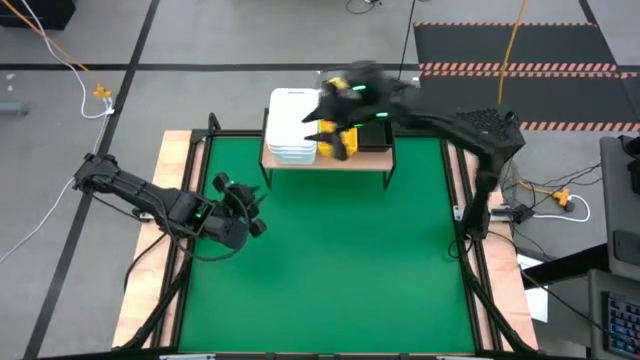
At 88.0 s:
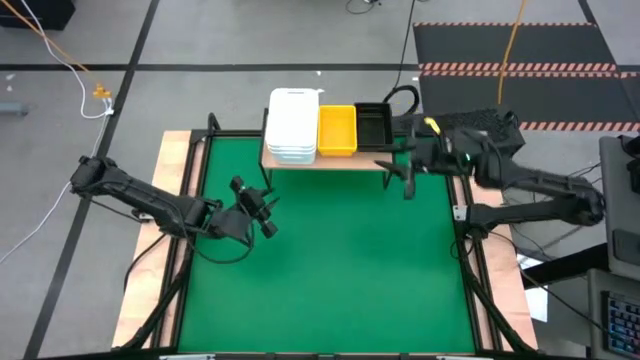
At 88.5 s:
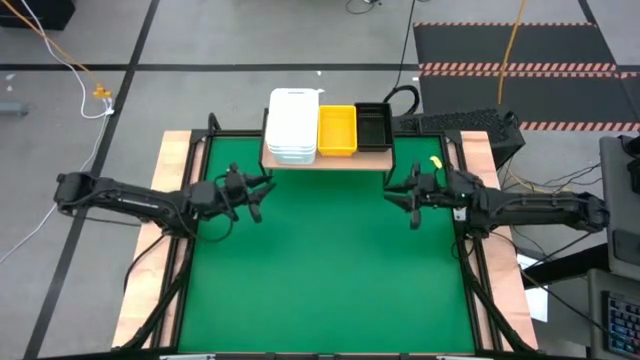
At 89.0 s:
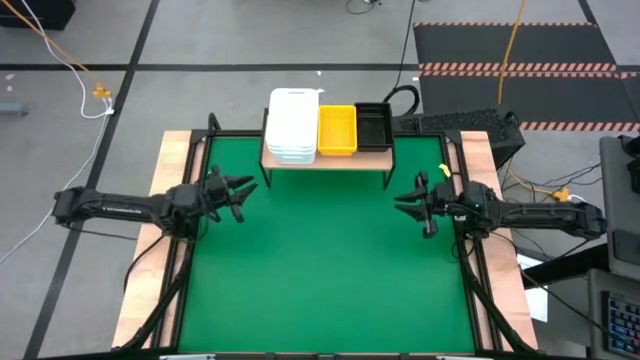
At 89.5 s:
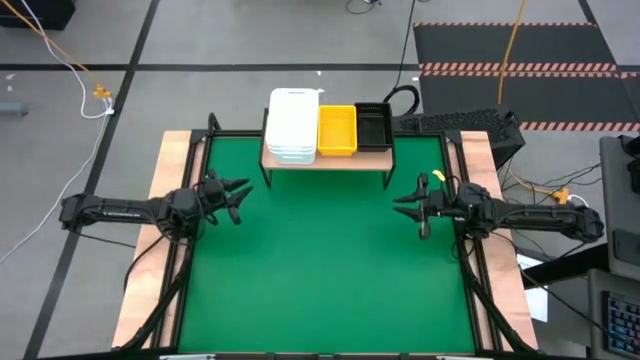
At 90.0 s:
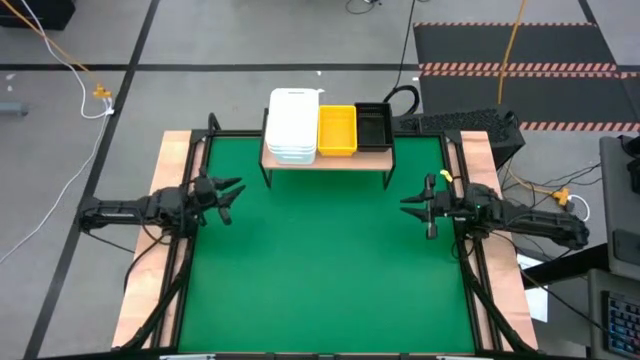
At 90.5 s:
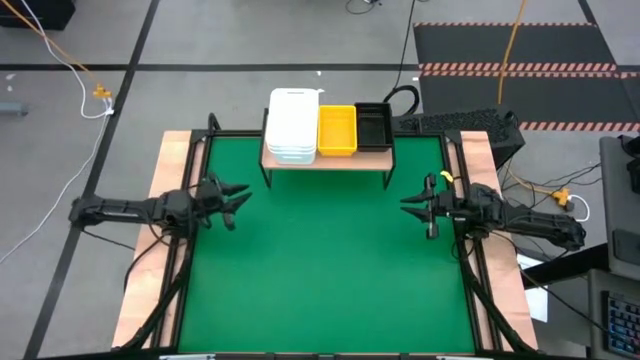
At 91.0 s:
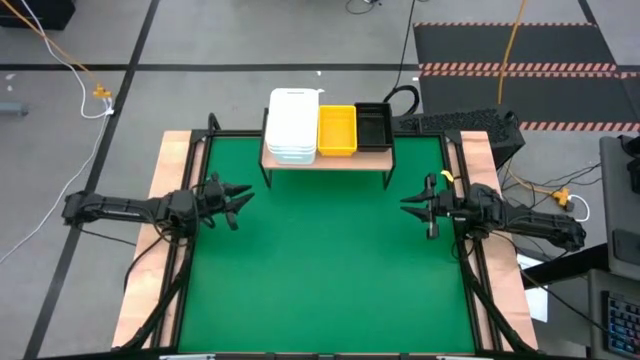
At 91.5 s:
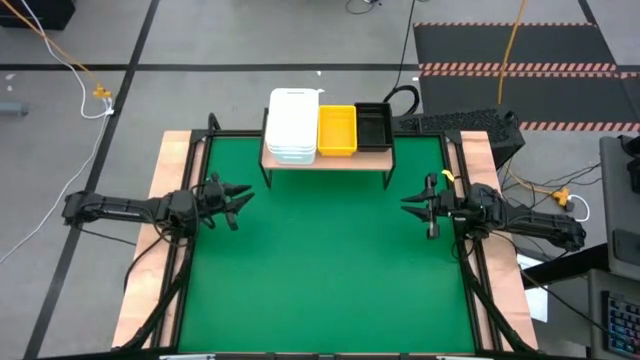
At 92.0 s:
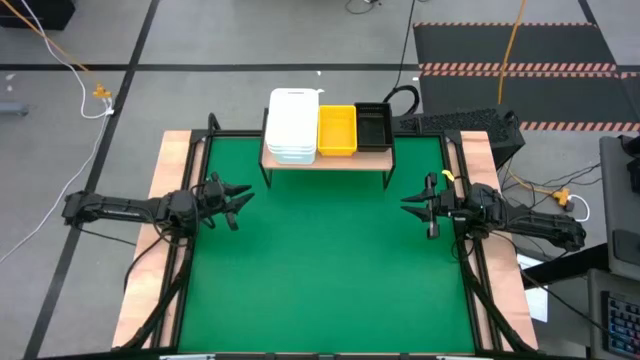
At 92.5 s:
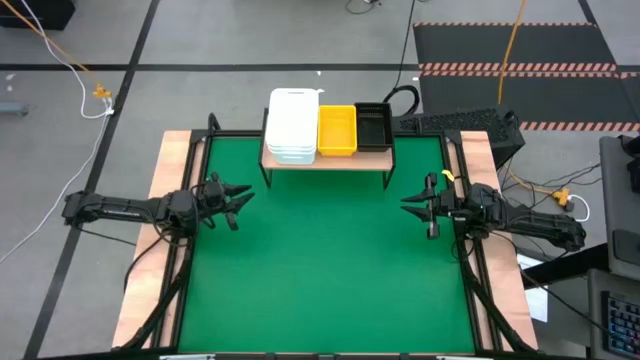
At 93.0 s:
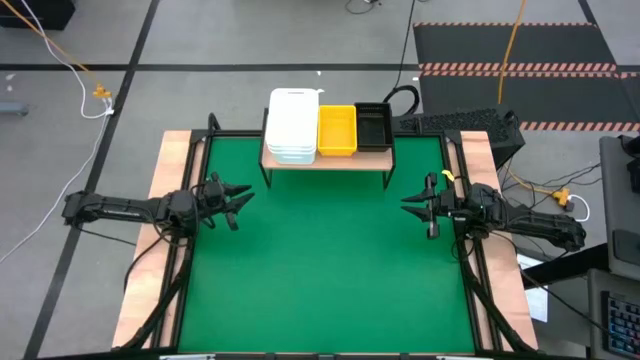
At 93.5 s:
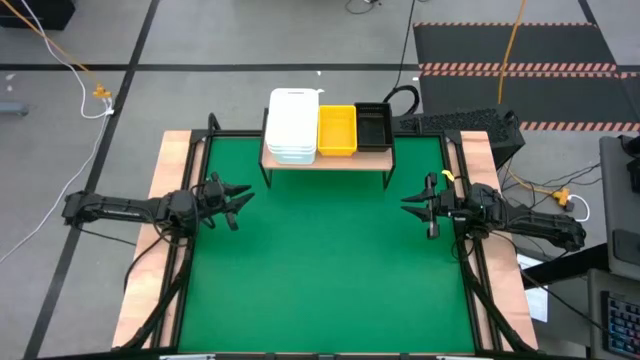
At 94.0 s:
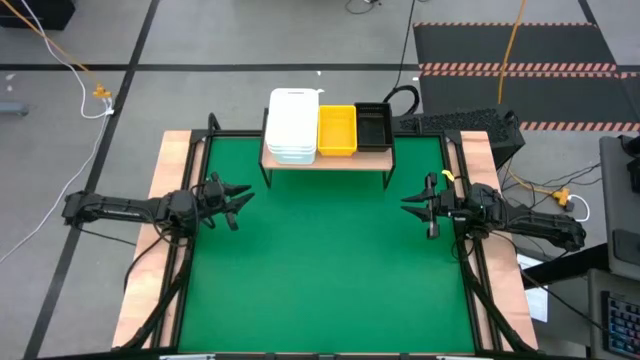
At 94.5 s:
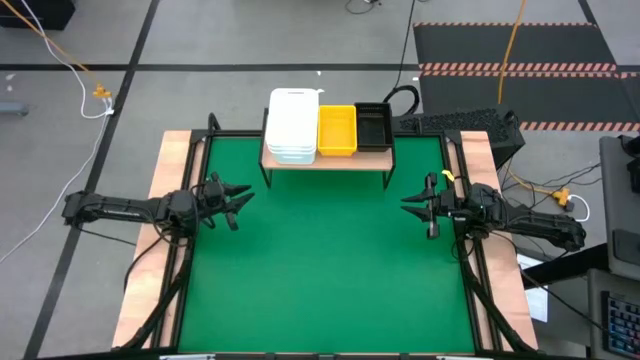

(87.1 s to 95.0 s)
Task: Stack baskets on shelf by color
Return to Home Position

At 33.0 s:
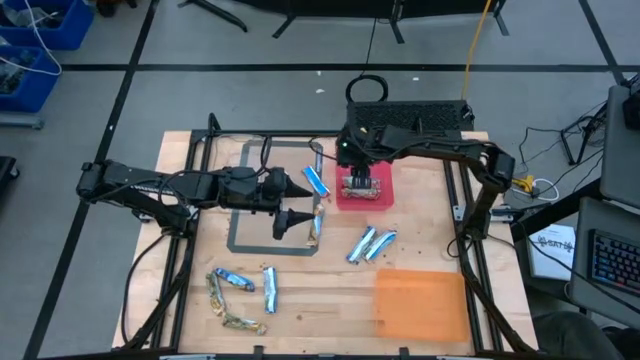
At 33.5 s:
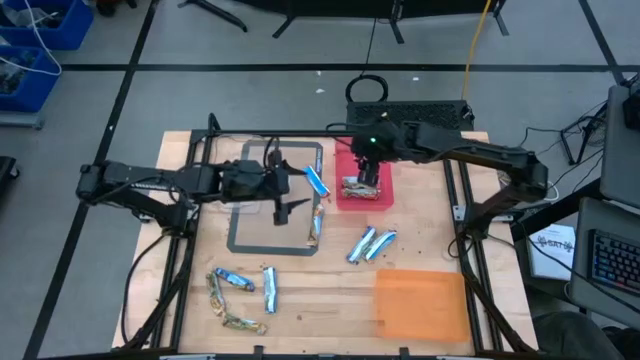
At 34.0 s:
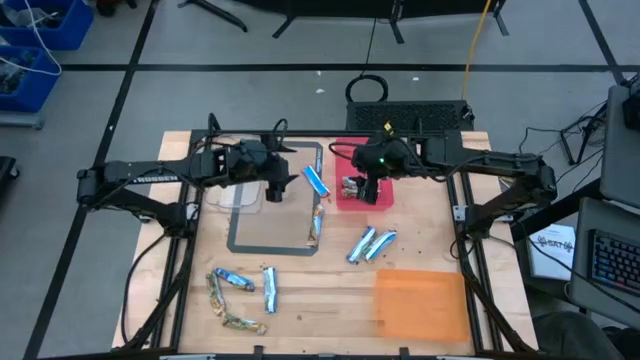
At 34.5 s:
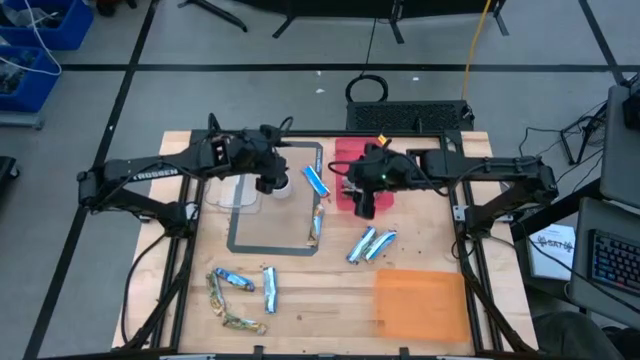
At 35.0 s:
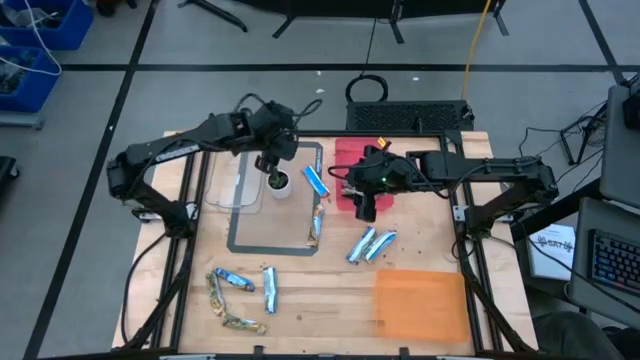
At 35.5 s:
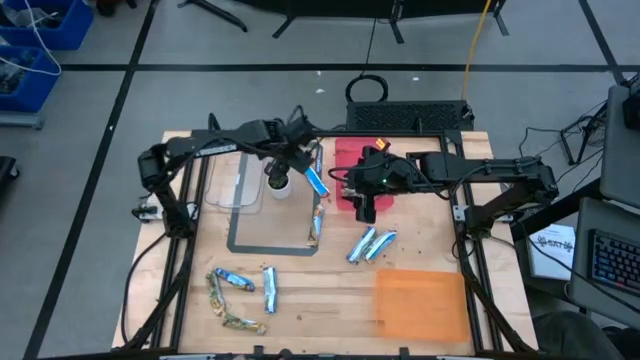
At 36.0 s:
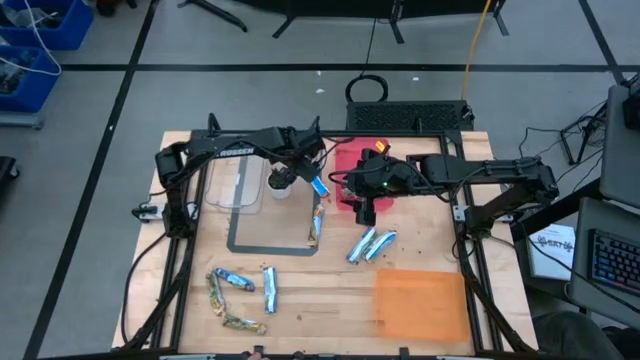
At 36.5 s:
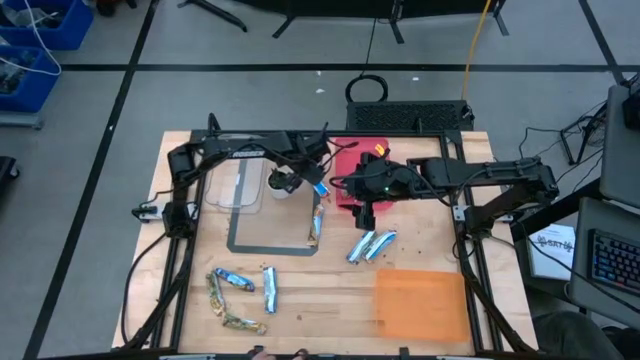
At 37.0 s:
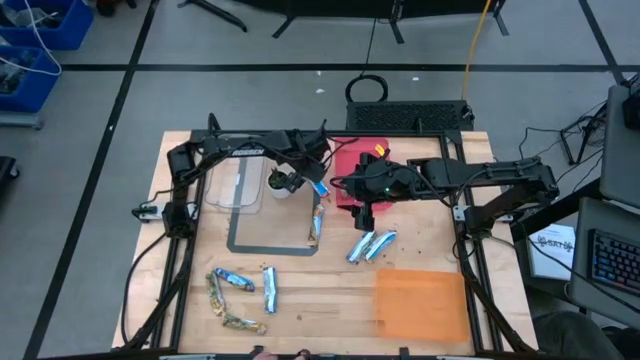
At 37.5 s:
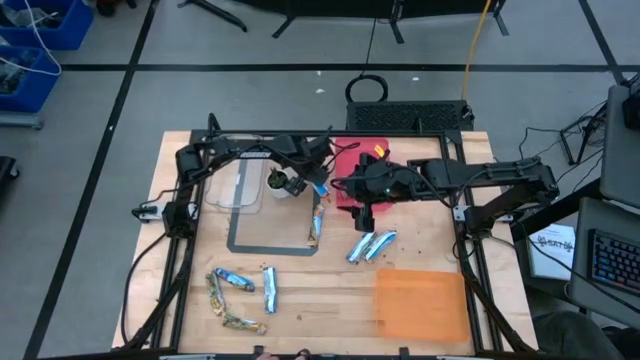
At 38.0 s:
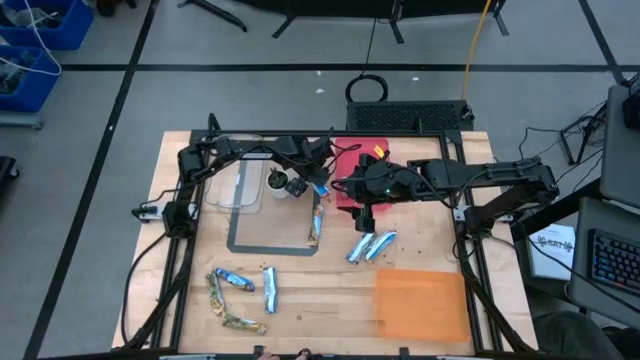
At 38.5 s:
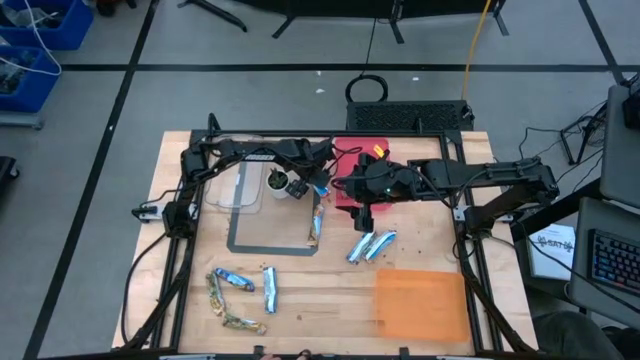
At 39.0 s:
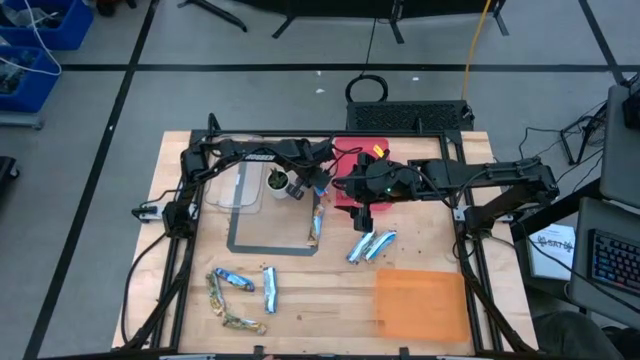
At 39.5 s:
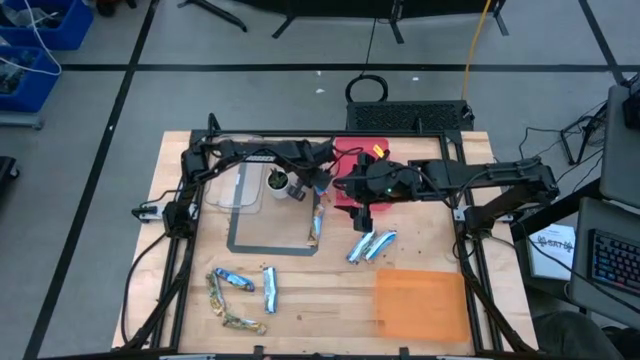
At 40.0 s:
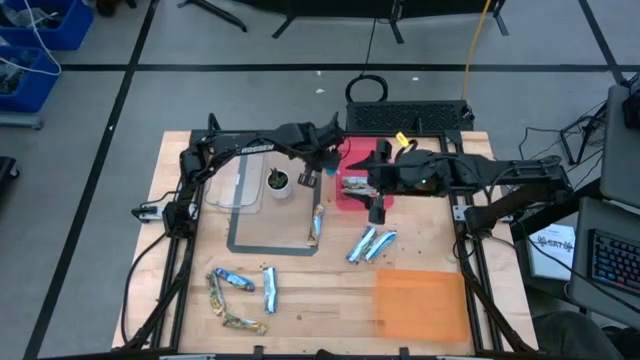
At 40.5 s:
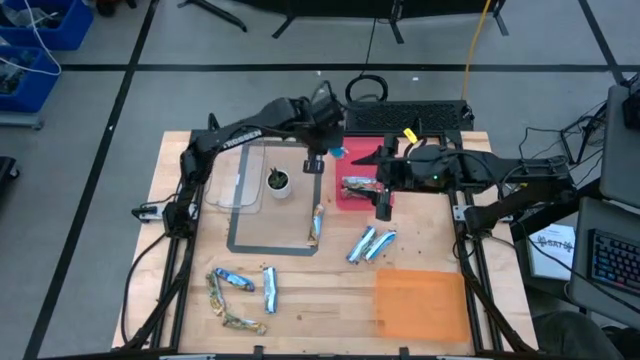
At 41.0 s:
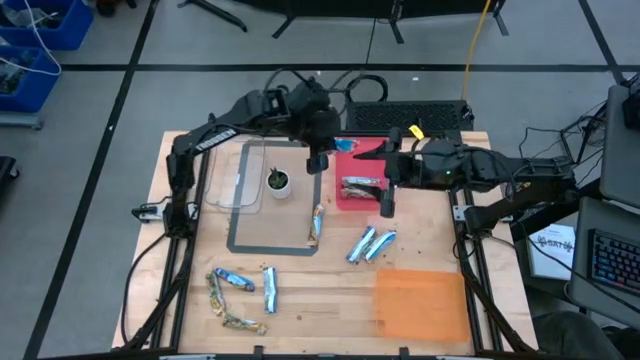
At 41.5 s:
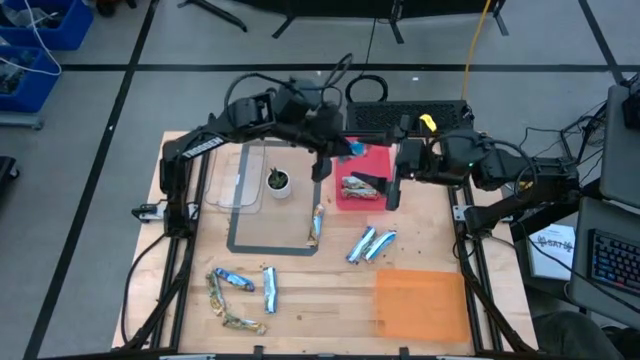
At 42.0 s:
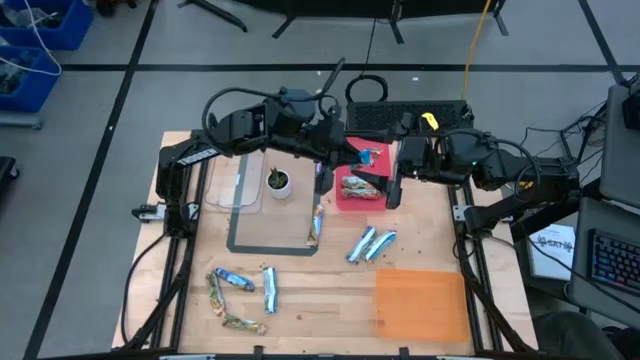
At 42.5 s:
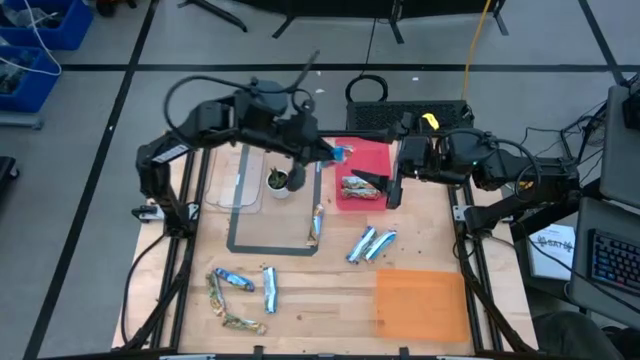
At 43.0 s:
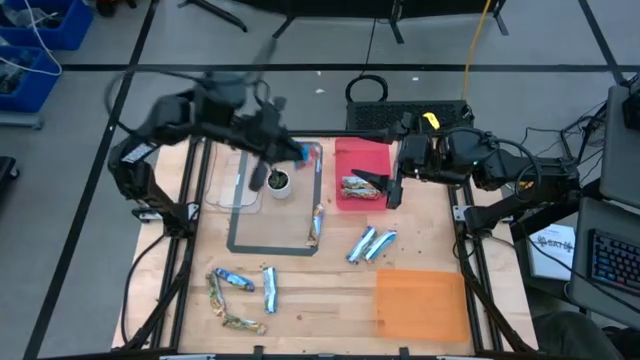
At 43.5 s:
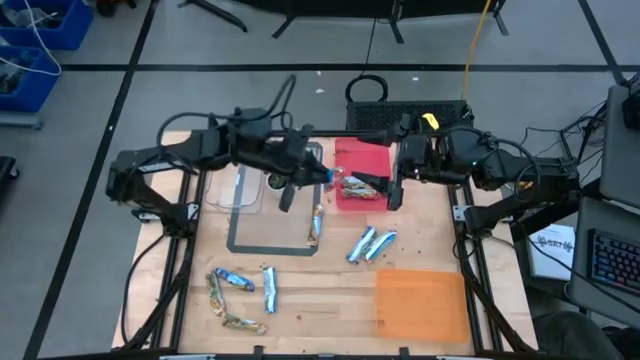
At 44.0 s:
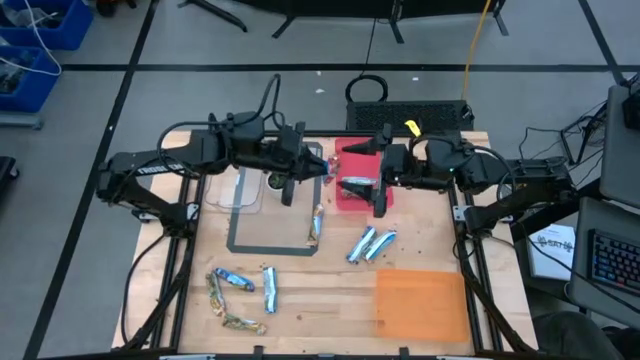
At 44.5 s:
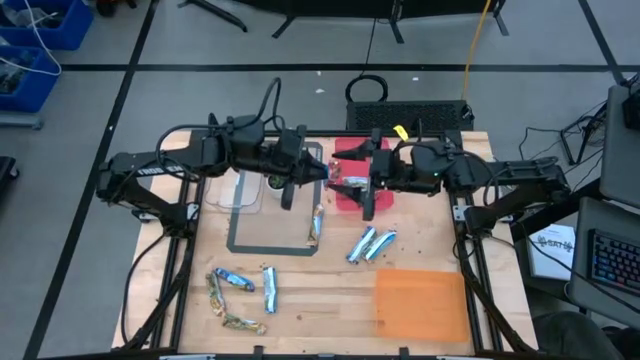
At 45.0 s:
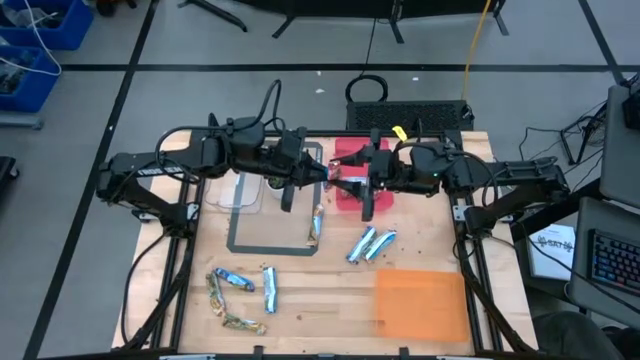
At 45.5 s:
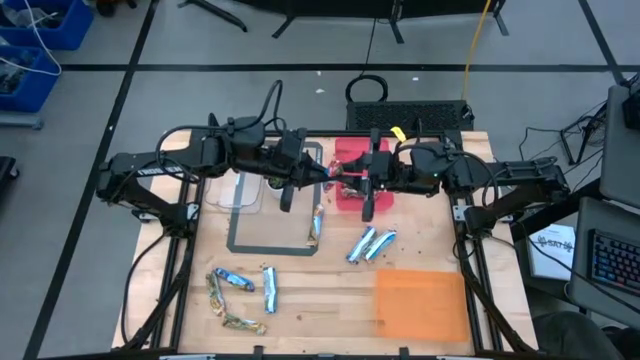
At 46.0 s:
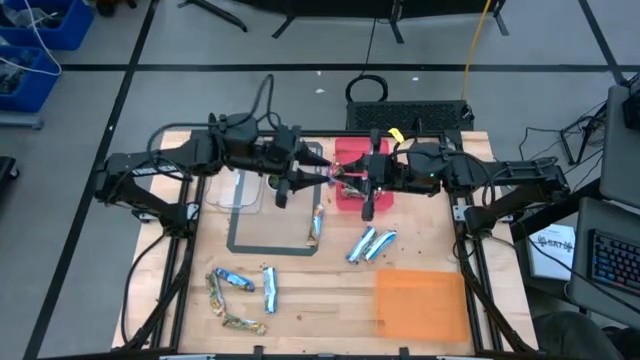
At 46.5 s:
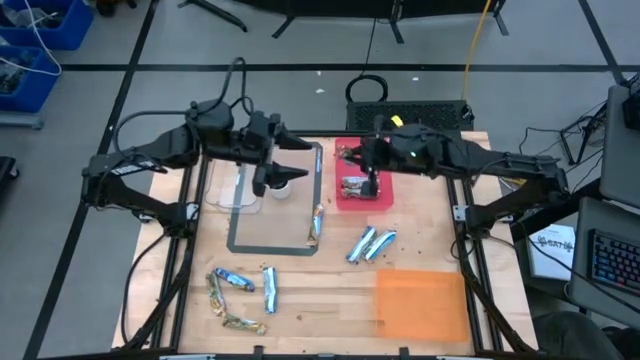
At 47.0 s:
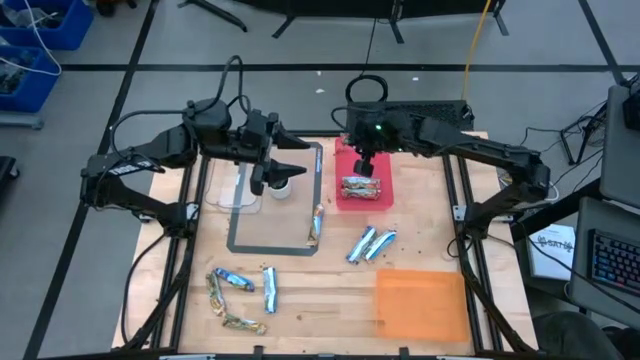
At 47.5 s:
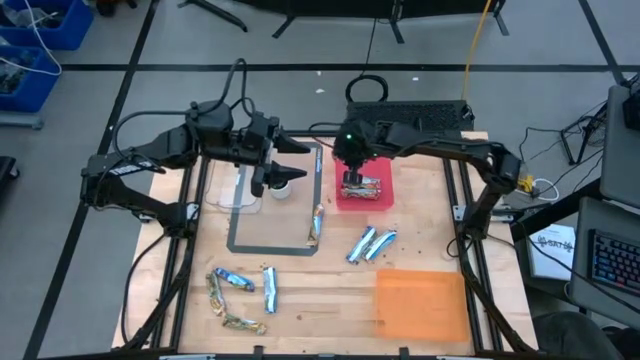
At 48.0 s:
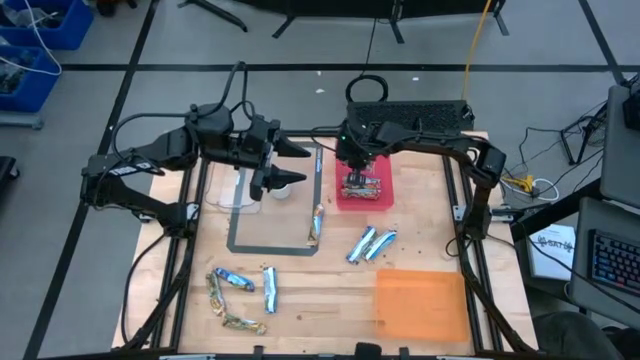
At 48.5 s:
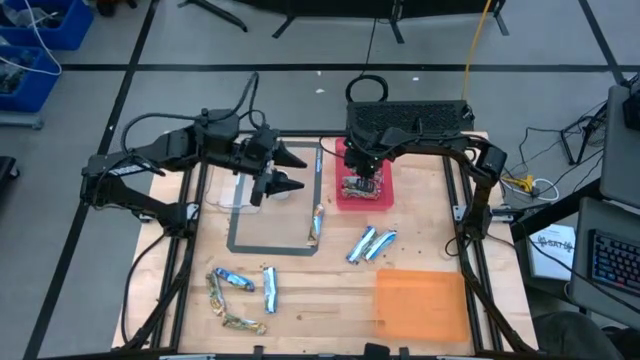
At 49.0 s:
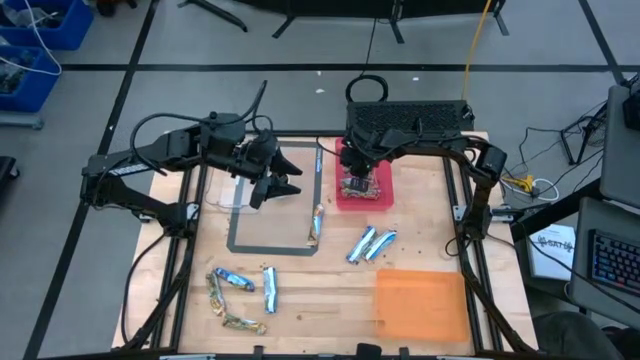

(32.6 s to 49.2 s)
Task: Pick and place Granola Bars by type
Put the red granola bar into the red bin
